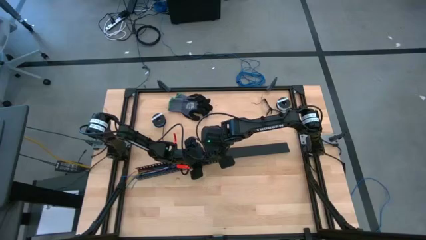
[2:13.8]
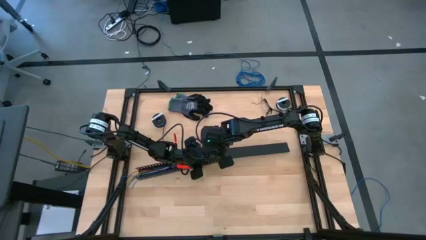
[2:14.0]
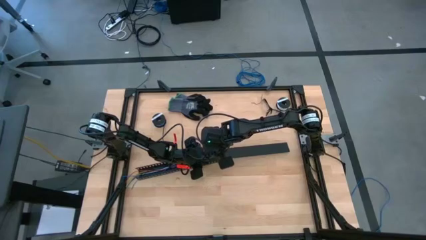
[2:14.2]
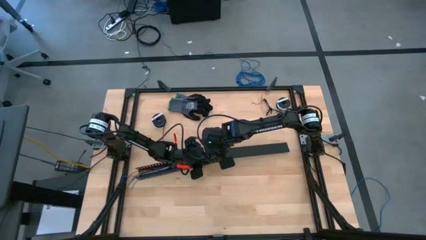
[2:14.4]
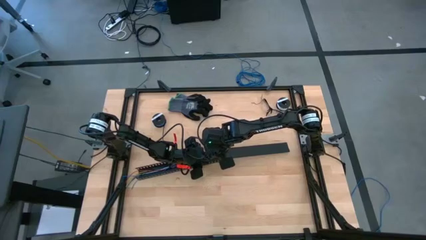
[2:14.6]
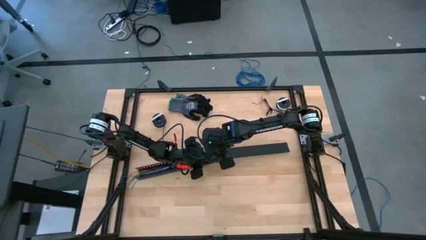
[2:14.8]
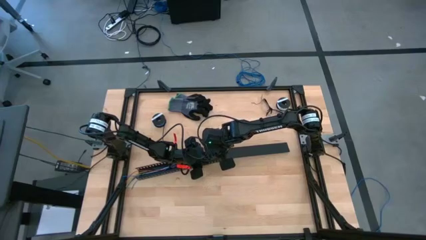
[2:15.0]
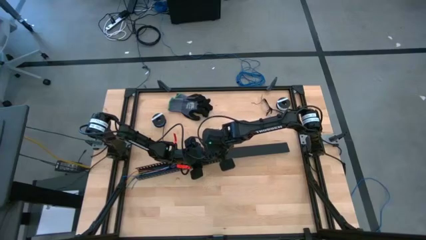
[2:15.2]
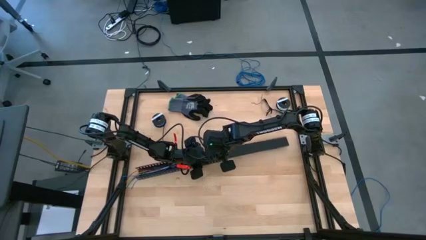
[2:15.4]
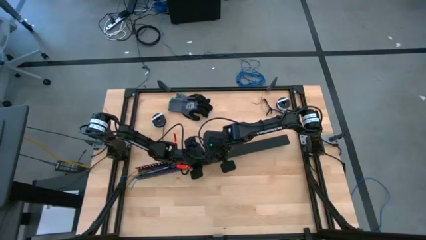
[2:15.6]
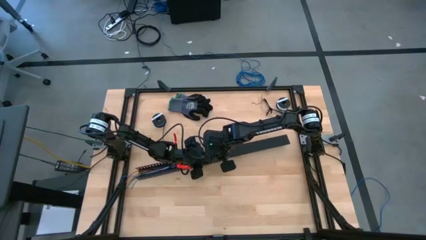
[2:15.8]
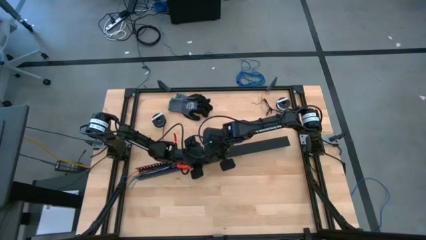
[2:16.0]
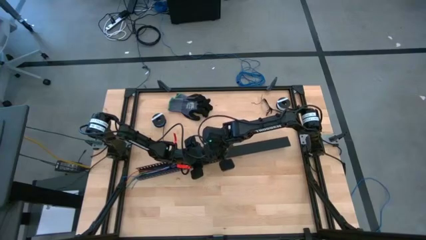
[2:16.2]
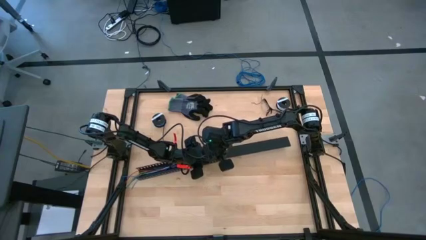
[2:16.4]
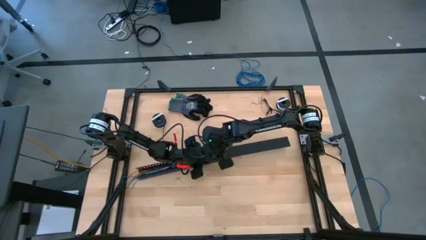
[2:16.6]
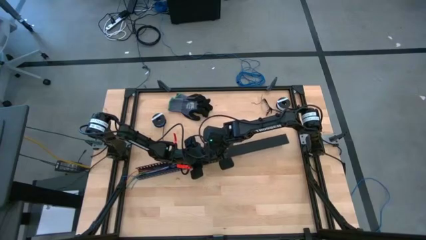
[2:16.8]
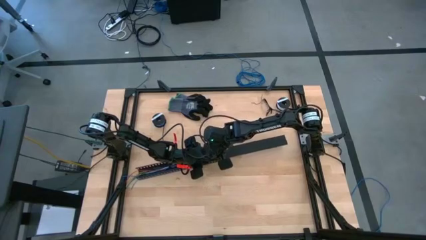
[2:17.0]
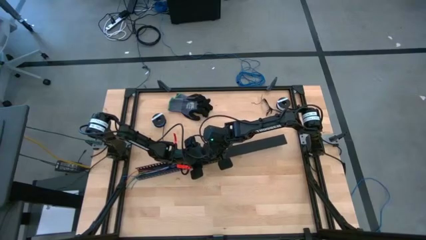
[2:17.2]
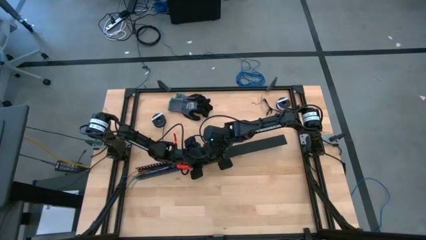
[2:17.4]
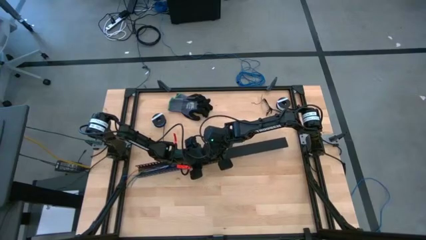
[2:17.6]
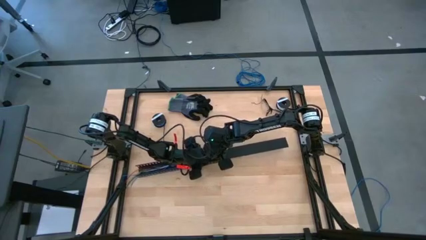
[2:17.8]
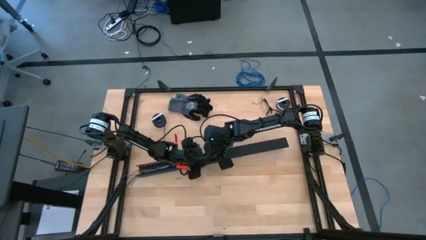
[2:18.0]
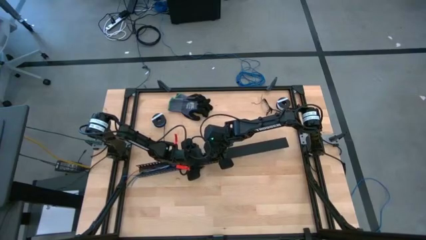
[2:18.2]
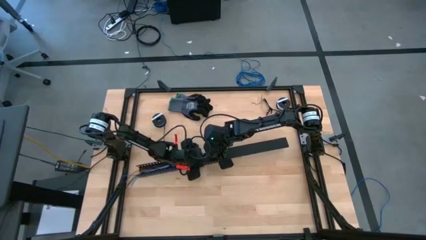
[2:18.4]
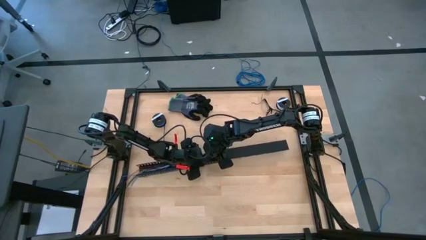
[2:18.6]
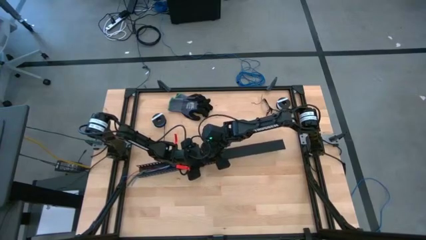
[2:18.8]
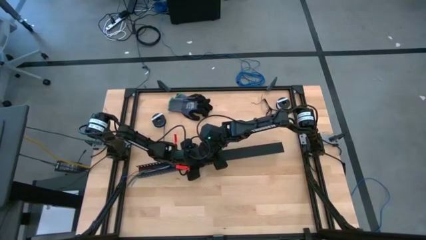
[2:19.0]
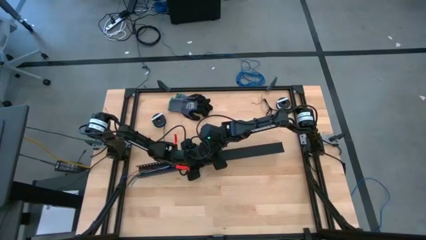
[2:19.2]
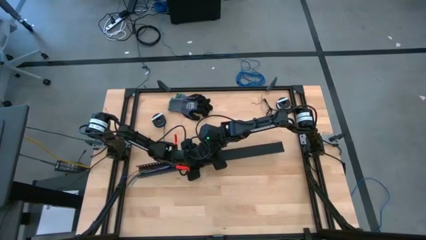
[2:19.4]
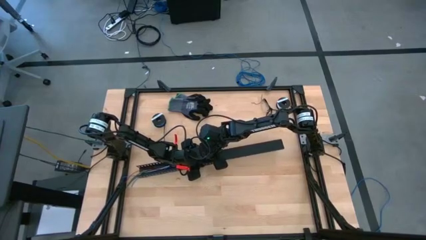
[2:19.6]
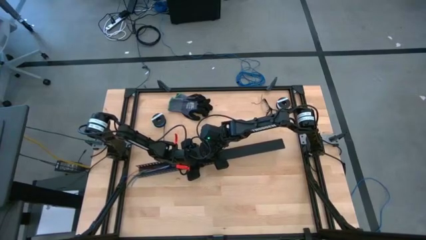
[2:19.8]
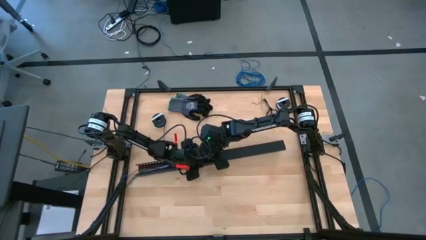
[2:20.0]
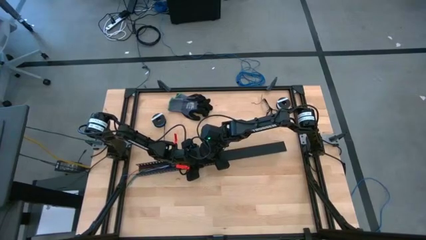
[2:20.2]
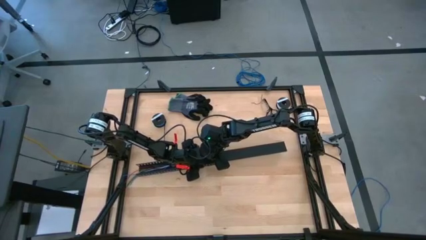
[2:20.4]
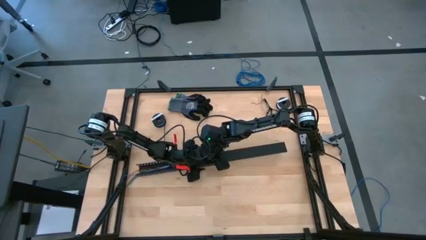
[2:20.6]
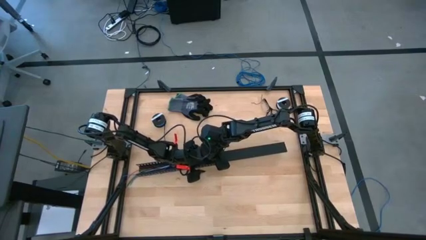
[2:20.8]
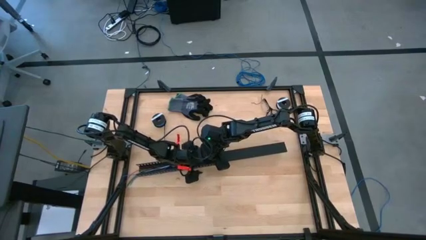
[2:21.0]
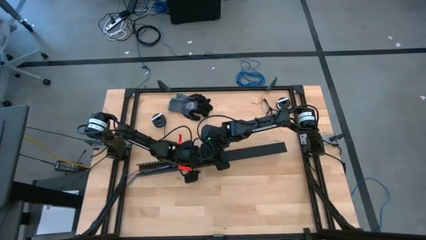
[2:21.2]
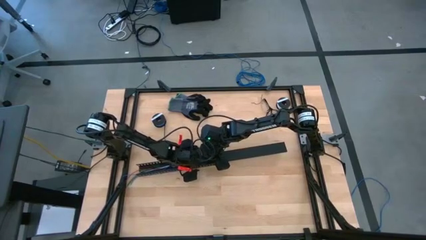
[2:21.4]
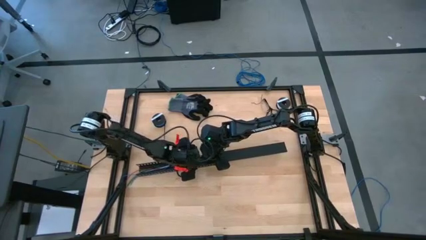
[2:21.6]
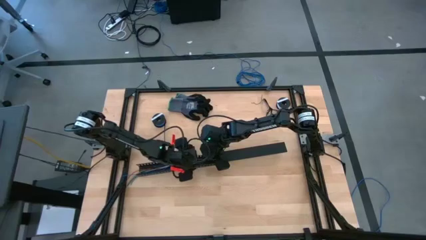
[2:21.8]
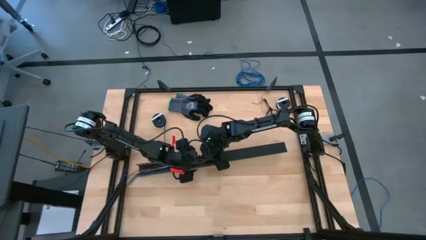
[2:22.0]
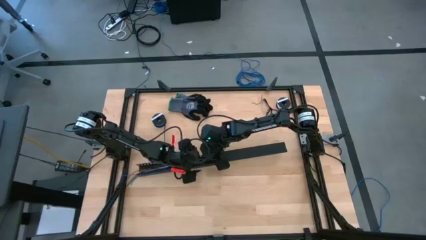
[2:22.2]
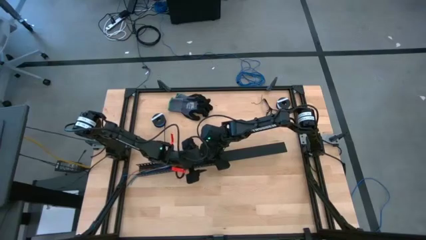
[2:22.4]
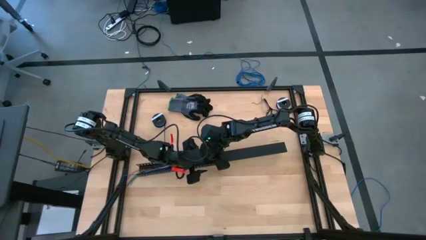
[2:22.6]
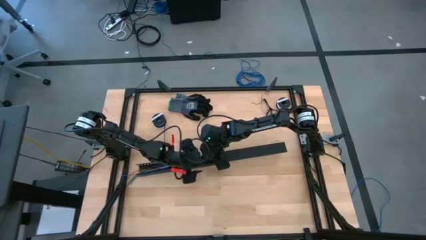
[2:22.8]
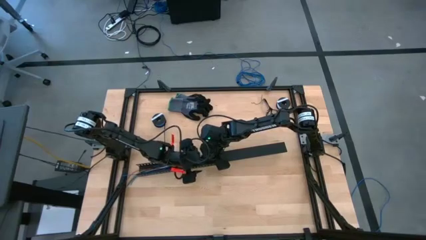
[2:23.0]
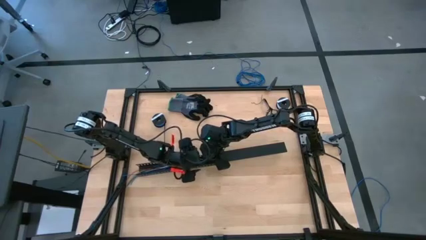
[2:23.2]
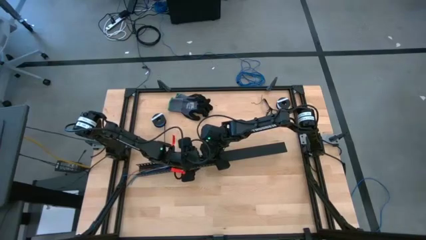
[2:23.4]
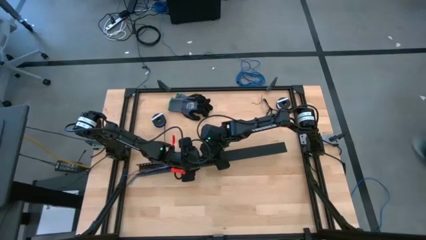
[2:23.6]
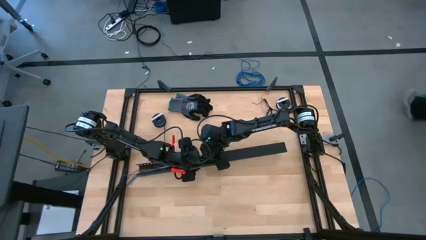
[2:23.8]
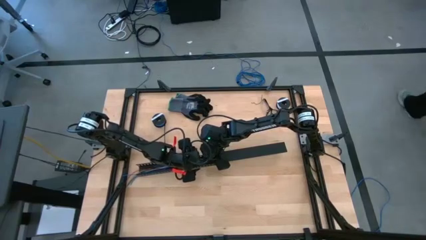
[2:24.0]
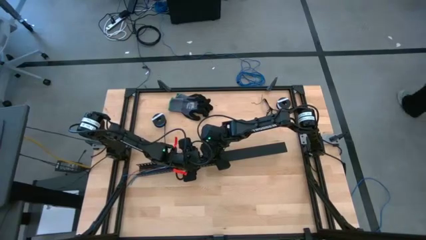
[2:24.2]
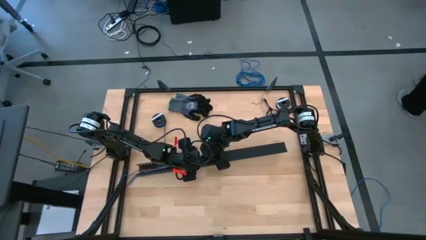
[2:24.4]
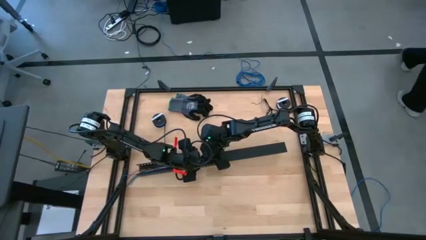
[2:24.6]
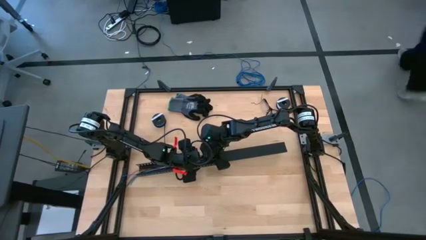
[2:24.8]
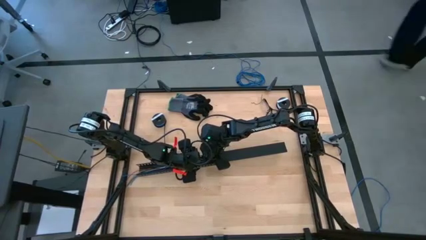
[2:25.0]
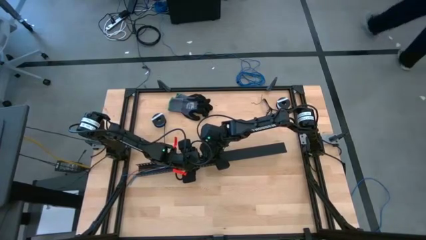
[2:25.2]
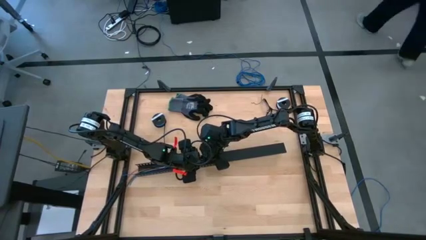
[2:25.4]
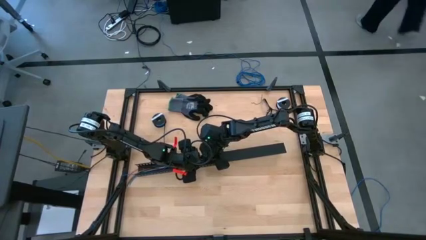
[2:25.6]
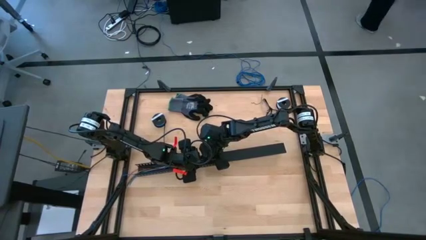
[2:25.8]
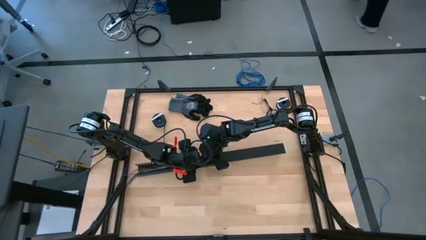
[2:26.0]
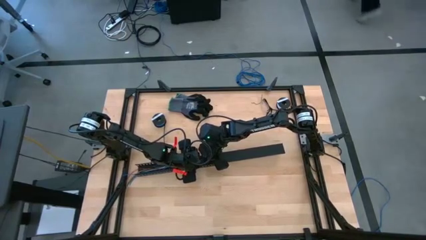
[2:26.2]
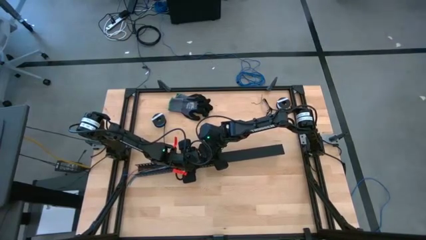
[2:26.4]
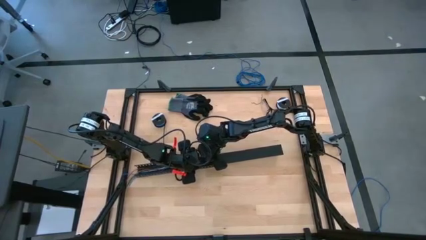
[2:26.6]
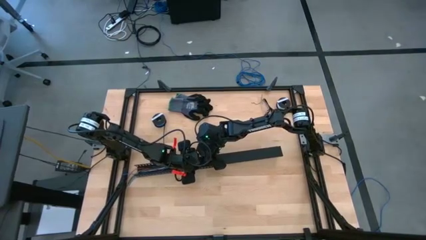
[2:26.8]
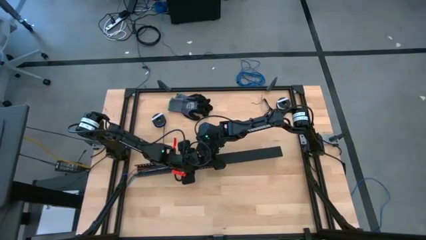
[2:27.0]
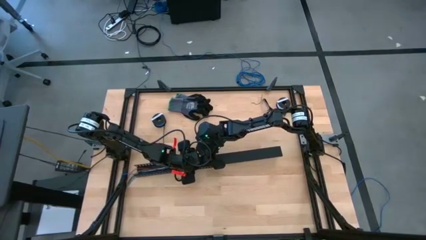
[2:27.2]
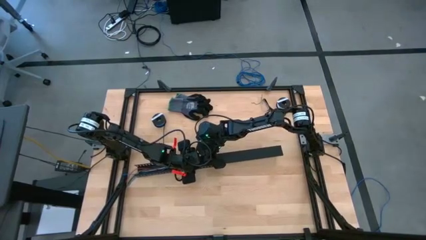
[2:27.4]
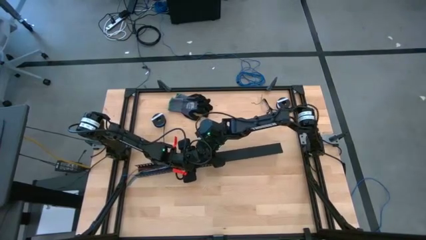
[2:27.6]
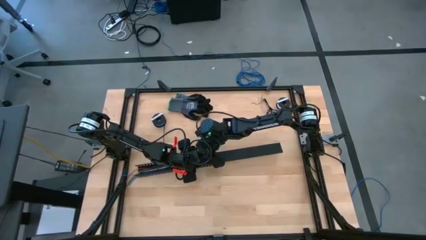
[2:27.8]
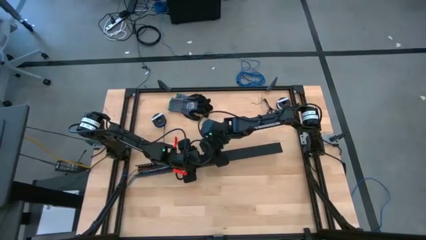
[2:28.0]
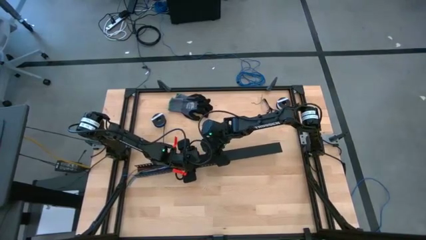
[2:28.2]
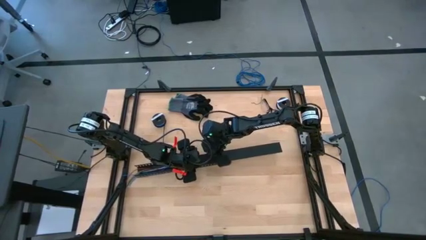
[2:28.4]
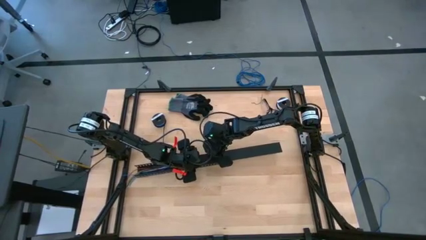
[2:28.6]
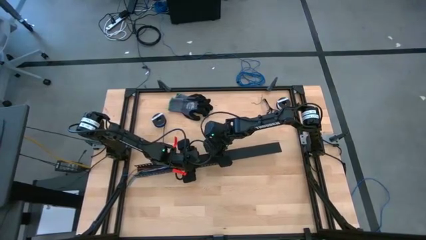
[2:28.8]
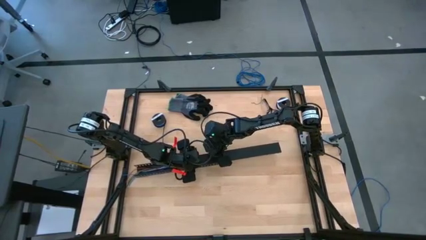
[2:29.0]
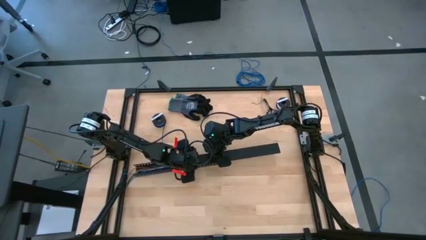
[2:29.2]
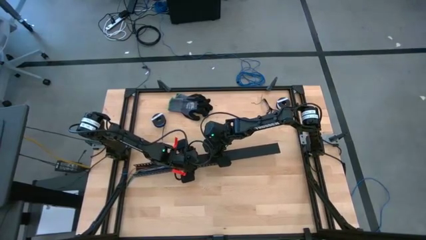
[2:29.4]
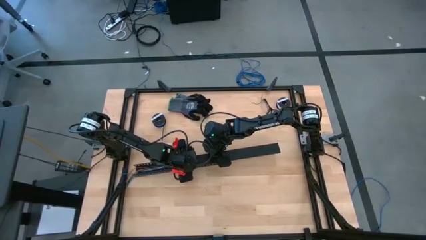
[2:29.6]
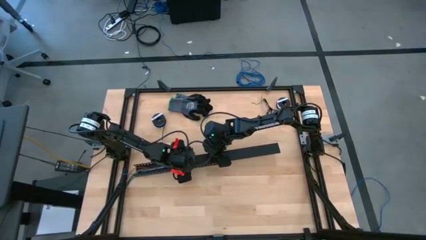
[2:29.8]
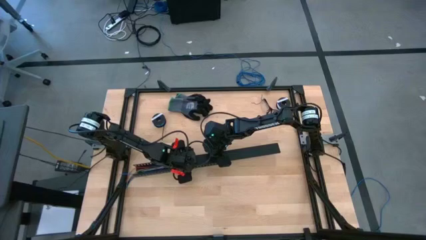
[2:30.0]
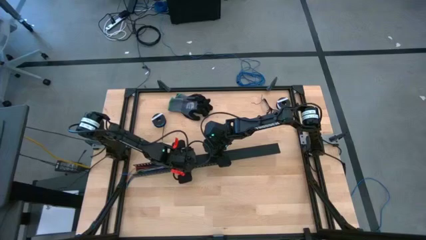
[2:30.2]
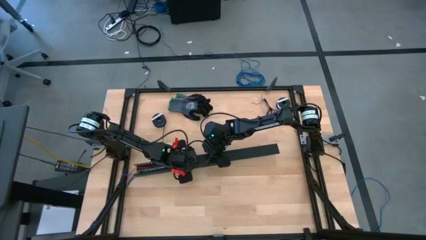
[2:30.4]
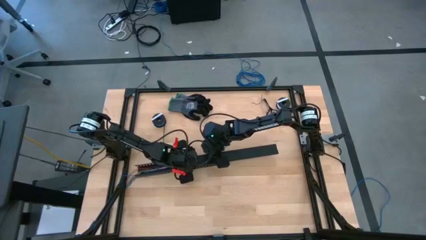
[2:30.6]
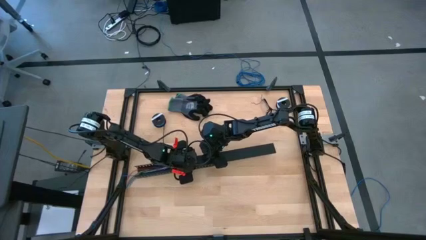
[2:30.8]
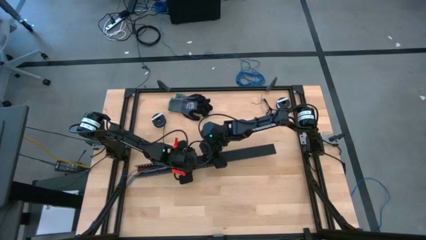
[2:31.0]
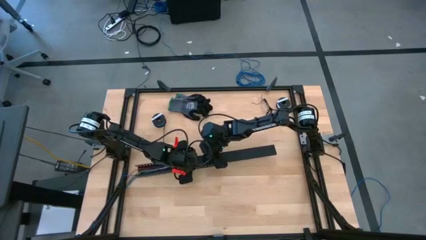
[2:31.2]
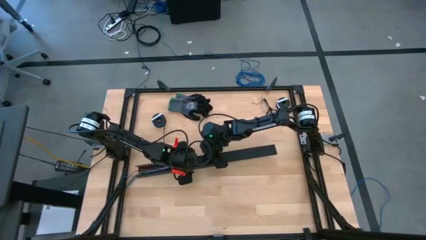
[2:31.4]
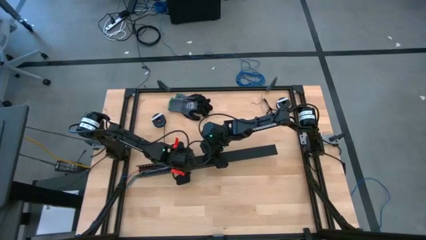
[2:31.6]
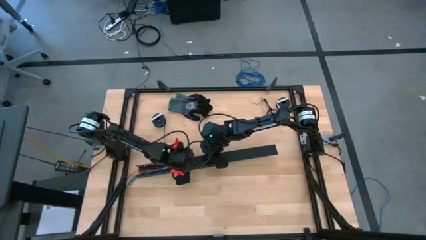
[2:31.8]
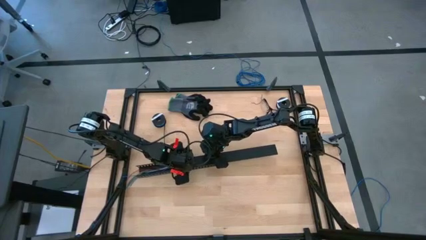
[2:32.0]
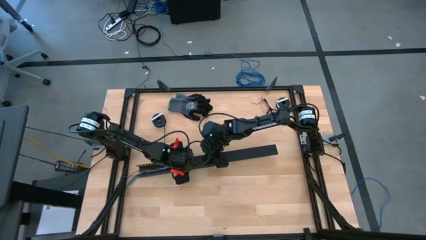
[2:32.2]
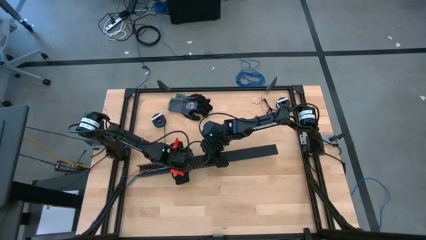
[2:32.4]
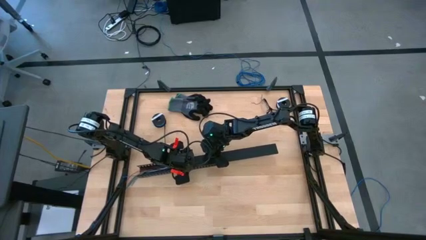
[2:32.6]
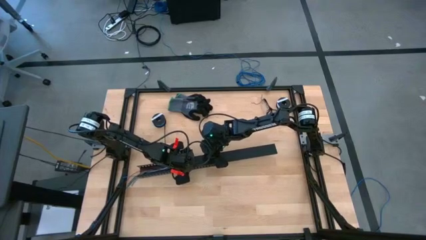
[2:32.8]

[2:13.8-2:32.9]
Task: Ziptie cables
Close the black cable duct with the cover
